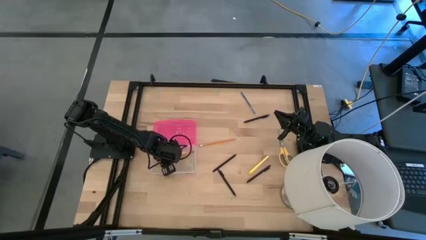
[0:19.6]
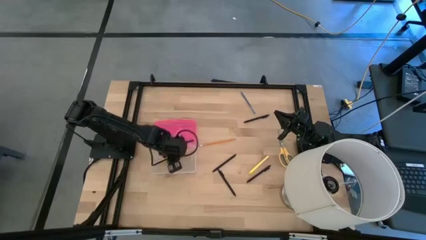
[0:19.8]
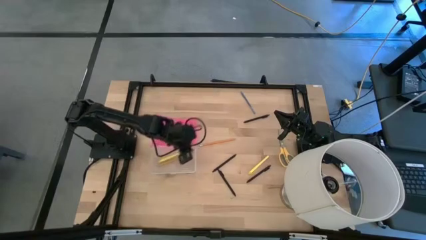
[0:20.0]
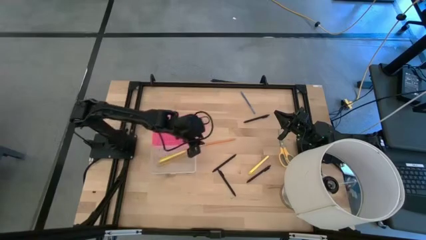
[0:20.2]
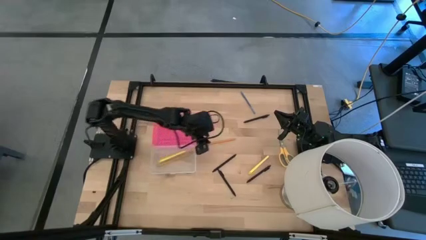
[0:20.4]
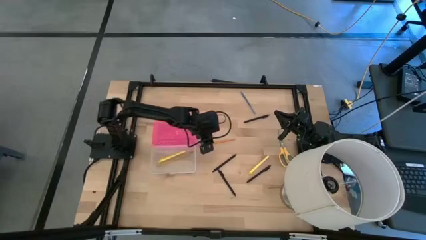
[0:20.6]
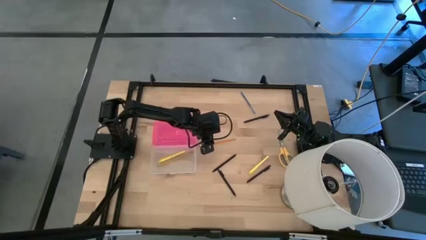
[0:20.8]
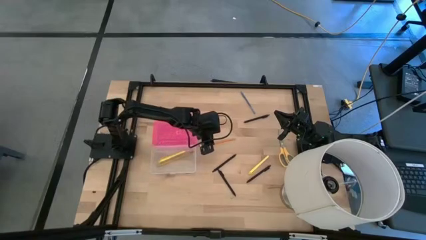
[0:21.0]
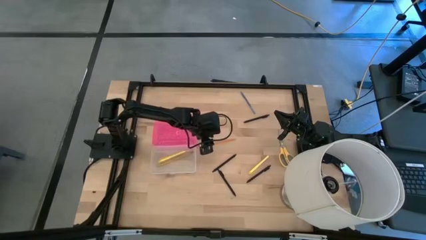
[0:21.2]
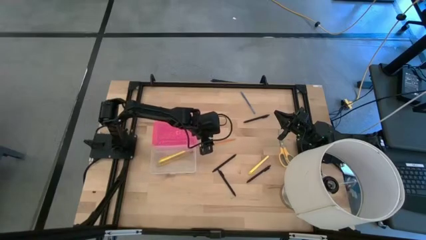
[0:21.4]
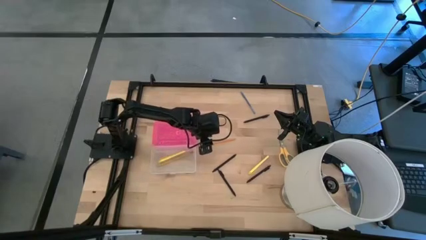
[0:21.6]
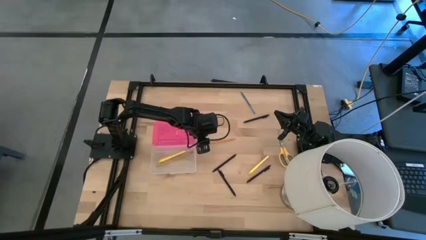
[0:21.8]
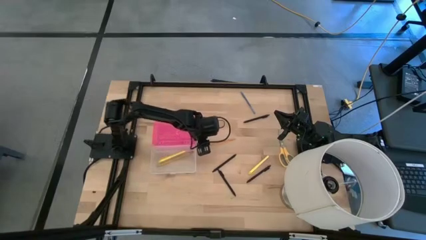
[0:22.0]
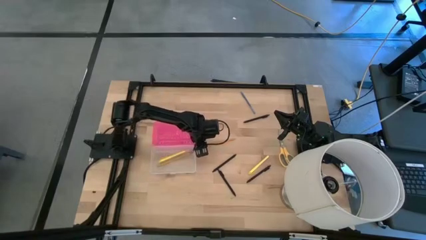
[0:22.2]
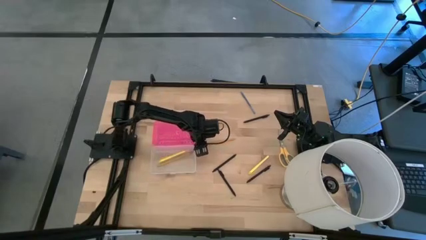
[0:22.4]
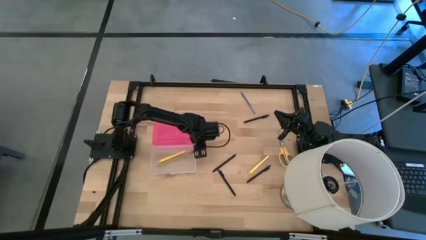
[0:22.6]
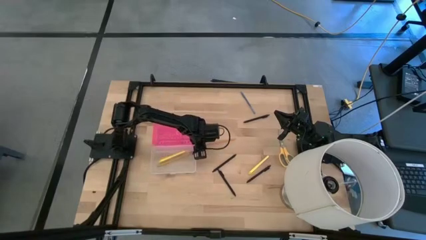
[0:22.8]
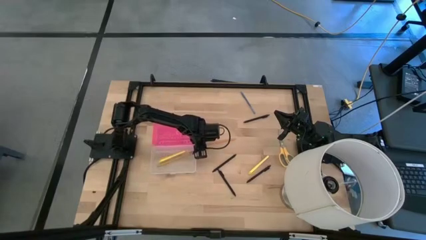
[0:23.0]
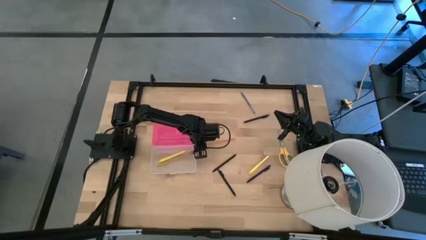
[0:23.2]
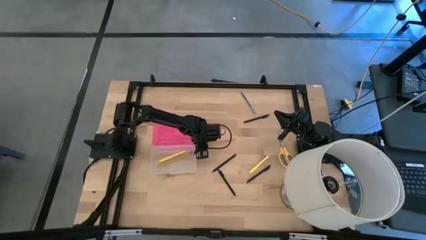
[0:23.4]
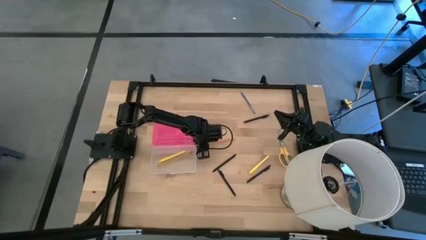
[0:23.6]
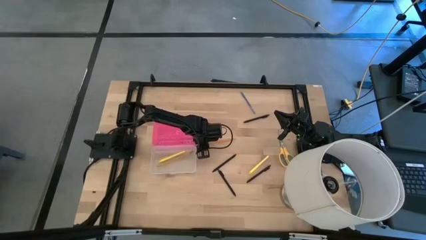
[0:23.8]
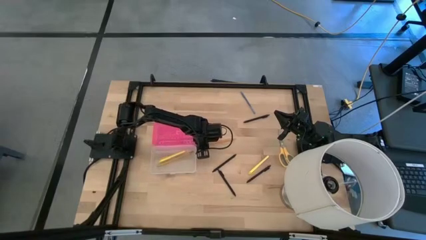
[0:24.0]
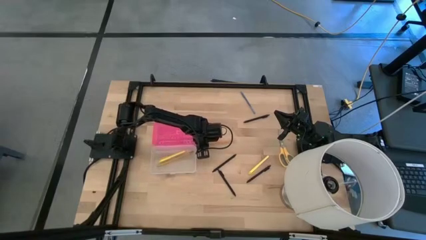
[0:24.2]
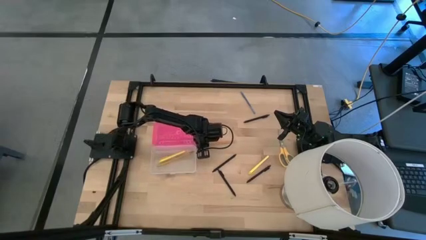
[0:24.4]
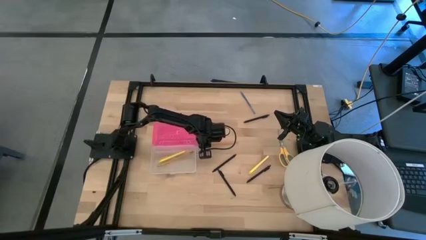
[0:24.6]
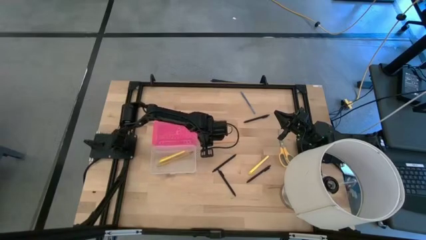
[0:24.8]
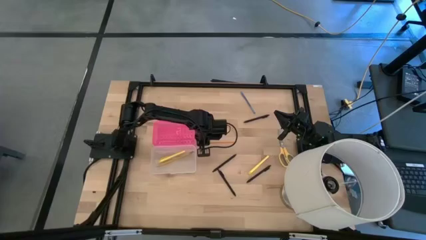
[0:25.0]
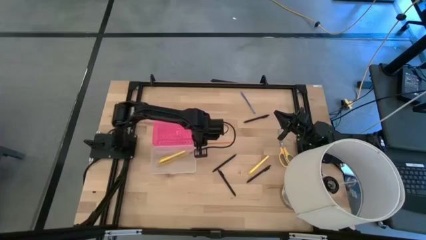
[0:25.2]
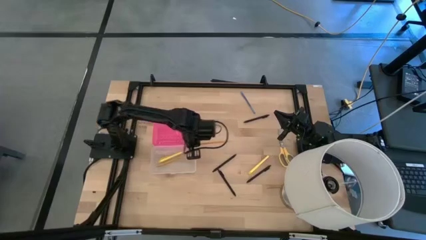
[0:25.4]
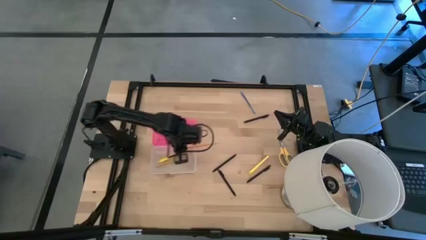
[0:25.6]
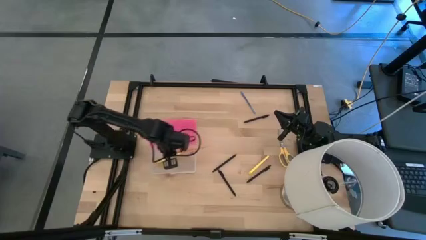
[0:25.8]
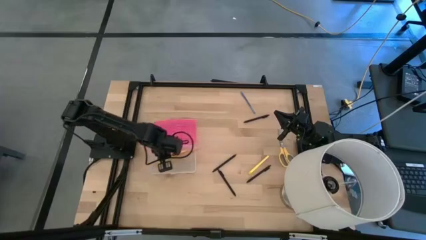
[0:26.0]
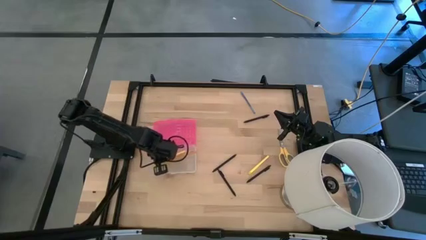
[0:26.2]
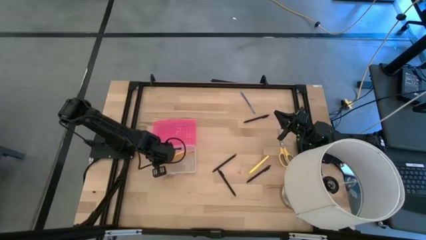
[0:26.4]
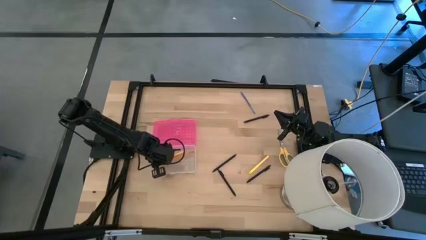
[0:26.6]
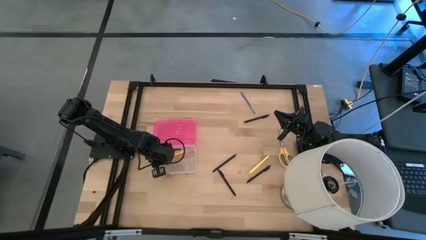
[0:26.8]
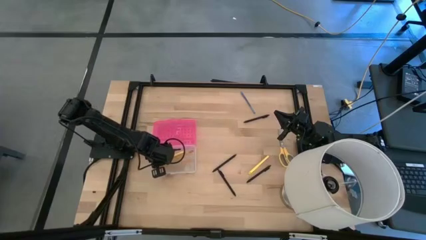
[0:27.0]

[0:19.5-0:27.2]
Task: Pick & place school supplies into a supply box
Put the yellow pencil into the pink supply box

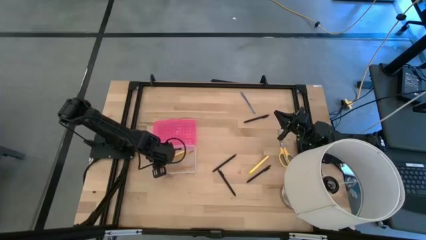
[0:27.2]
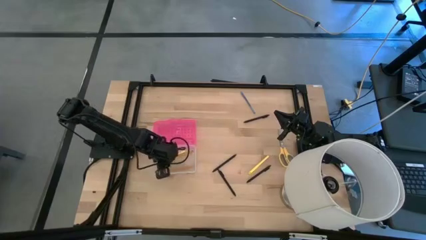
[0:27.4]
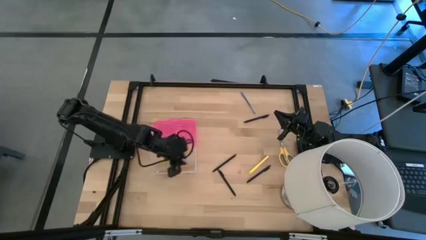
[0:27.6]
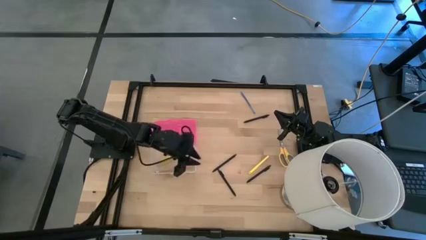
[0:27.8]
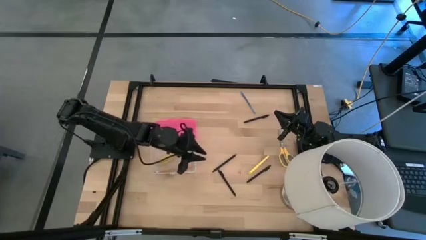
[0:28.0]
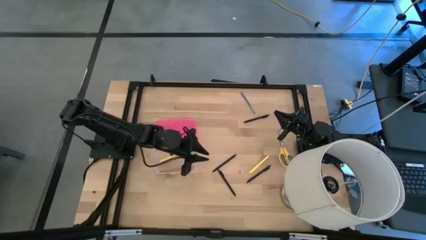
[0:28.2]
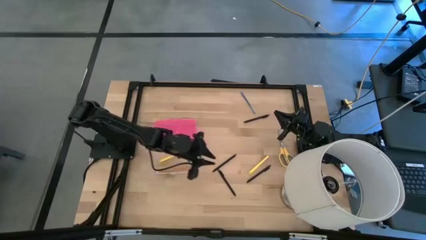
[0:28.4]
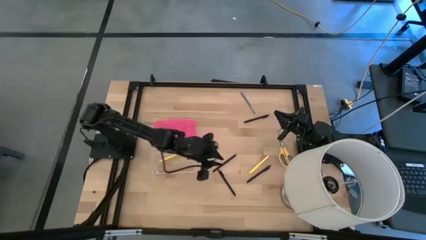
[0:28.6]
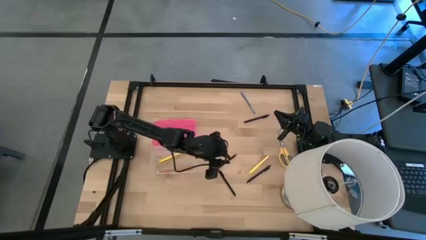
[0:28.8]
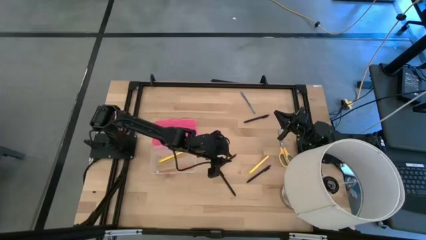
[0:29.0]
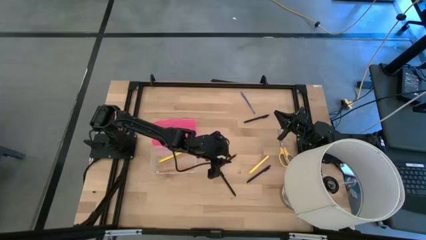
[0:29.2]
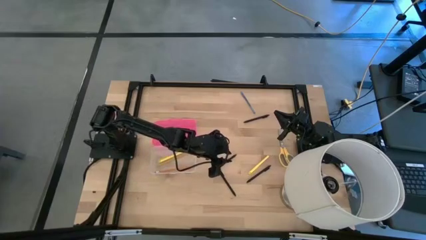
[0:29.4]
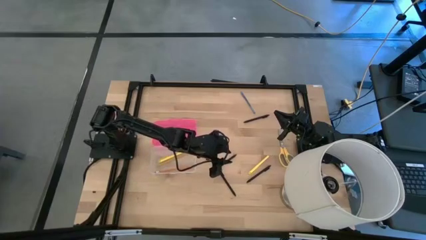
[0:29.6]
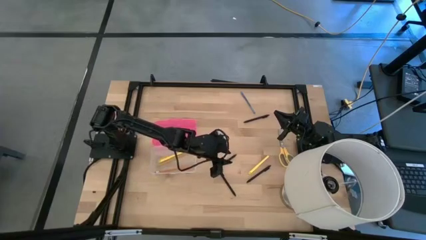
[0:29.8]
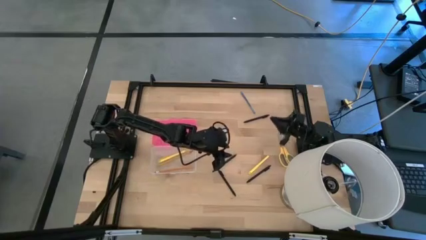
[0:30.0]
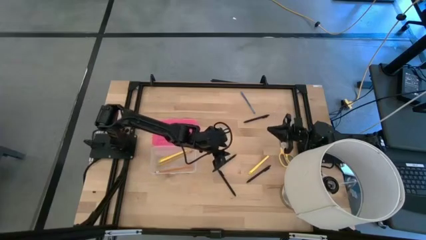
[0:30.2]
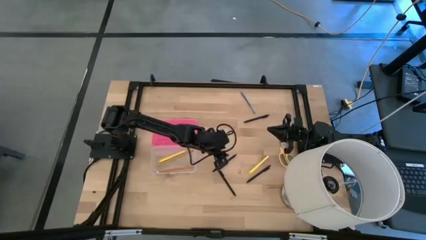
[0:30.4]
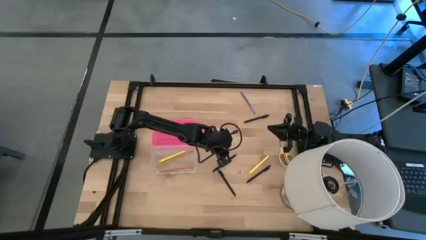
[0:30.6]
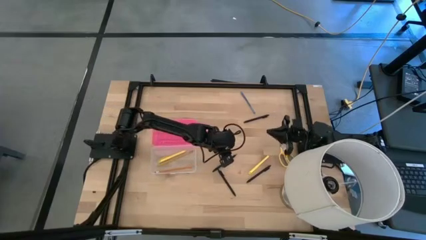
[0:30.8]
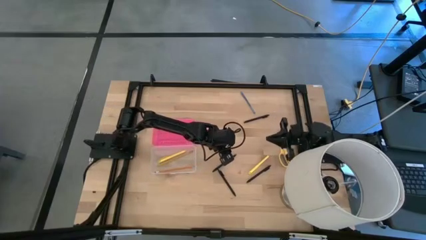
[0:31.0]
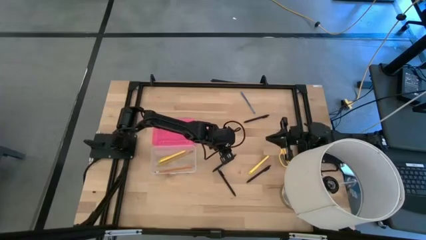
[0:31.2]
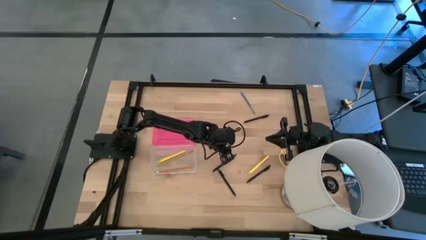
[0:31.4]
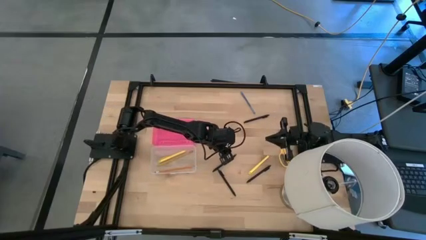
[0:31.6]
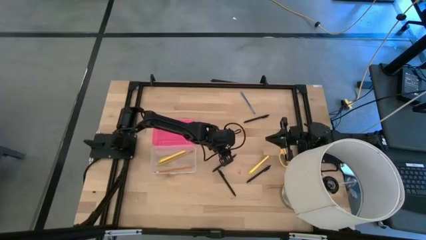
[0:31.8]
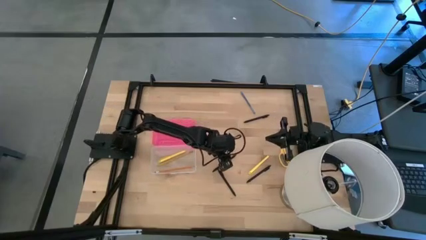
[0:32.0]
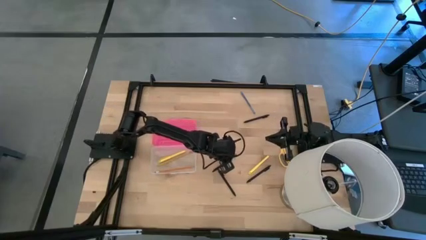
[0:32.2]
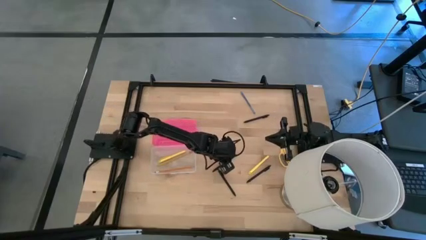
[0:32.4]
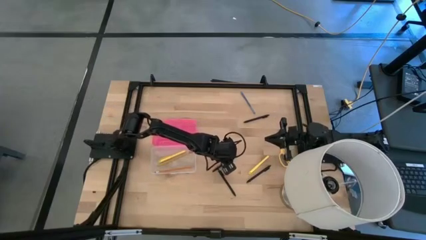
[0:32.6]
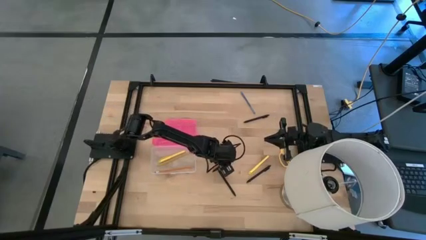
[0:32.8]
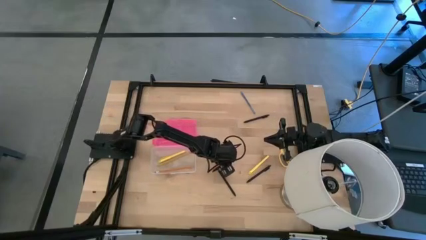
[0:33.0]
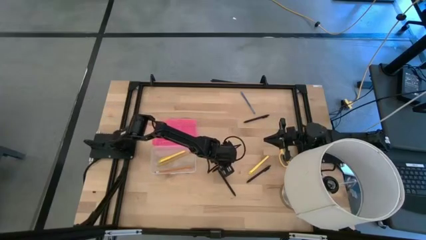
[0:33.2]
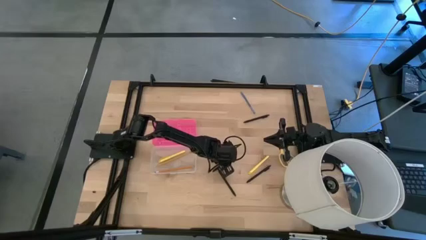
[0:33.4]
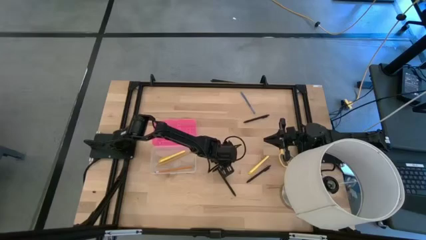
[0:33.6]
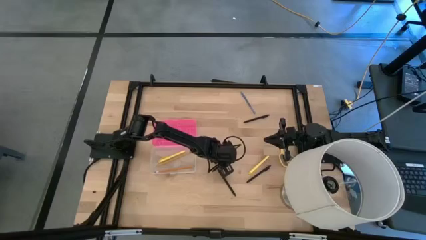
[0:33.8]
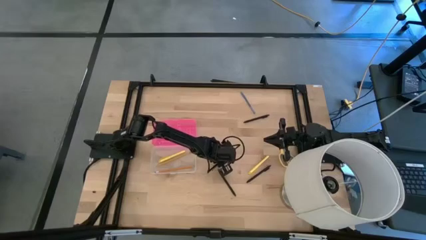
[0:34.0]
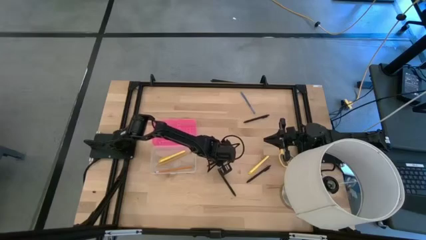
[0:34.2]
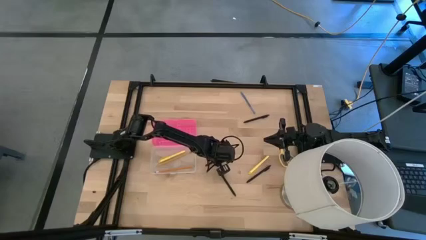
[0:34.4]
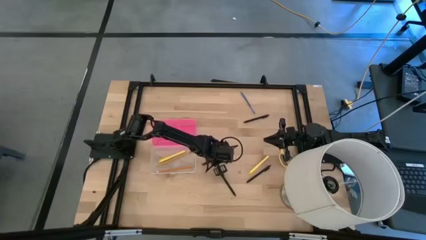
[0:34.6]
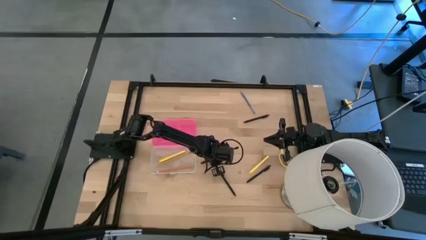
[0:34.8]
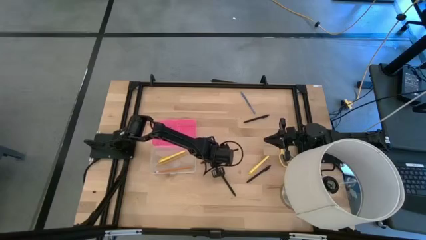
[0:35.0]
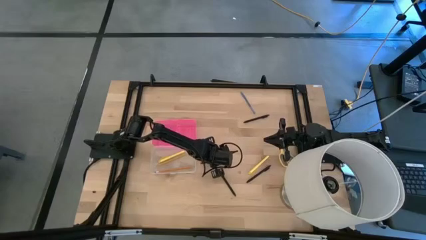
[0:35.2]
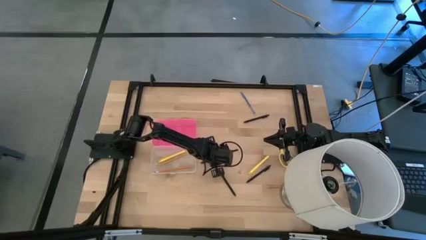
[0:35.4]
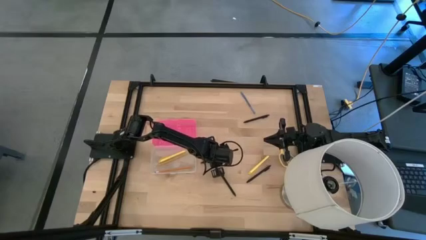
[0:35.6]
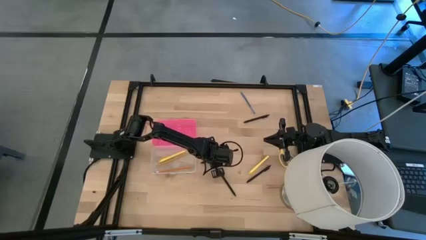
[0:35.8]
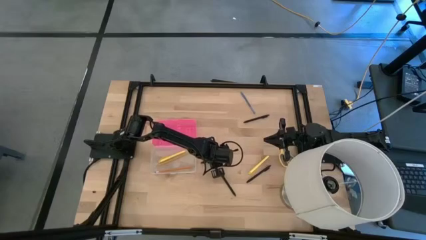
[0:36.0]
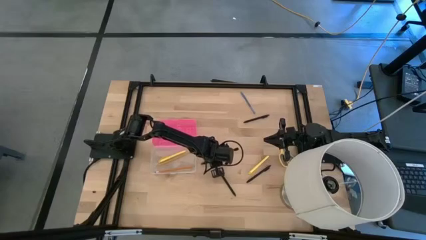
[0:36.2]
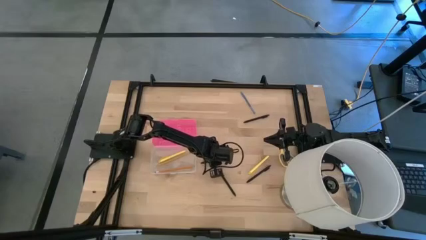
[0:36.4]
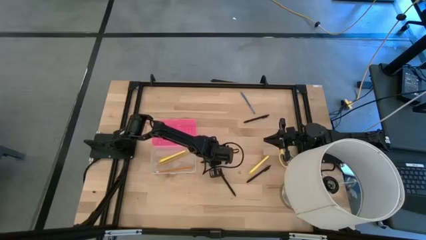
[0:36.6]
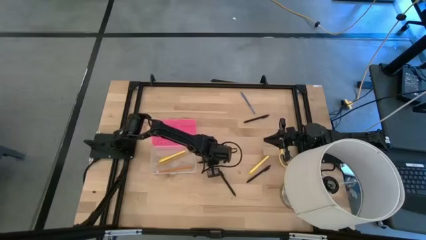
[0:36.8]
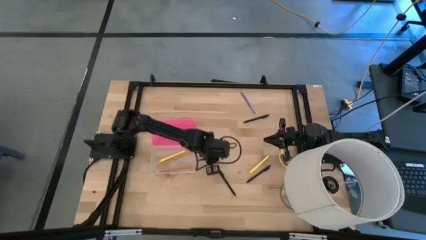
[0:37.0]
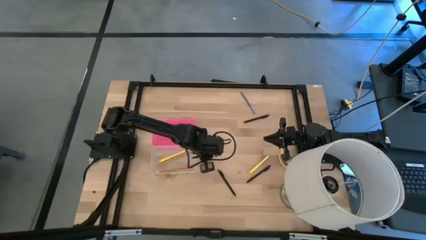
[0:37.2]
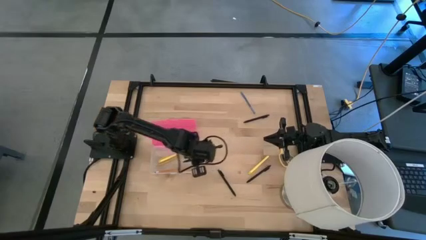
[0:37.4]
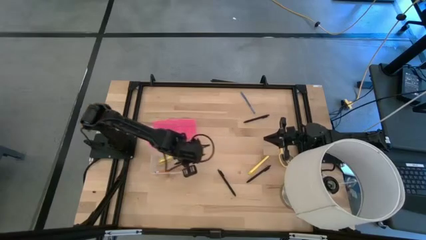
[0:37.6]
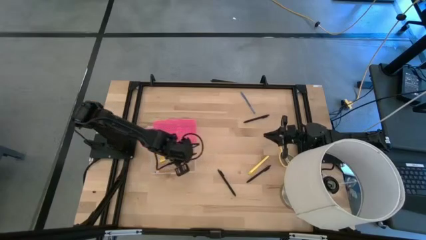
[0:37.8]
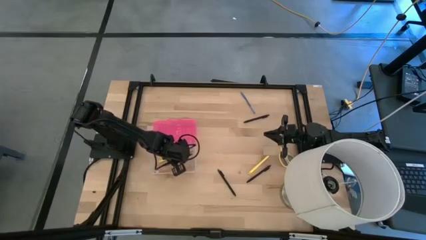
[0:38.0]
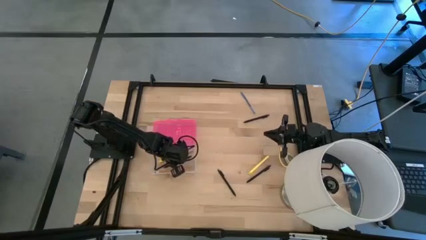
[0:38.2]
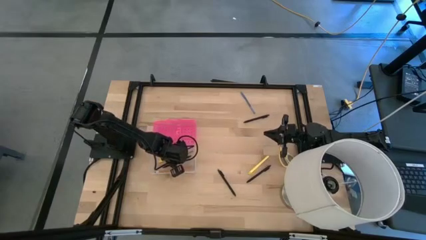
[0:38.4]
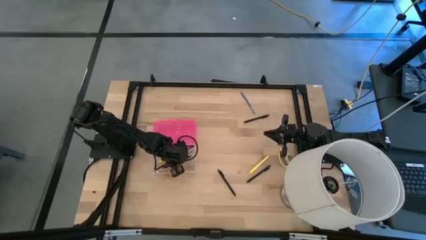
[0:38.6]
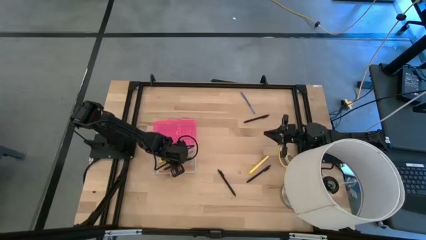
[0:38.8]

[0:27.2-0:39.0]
Put the middle black pen into the pink supply box
